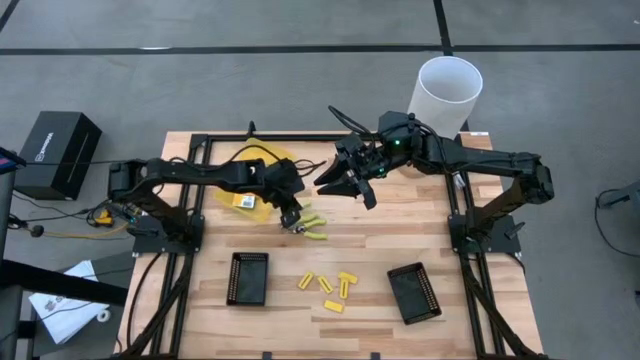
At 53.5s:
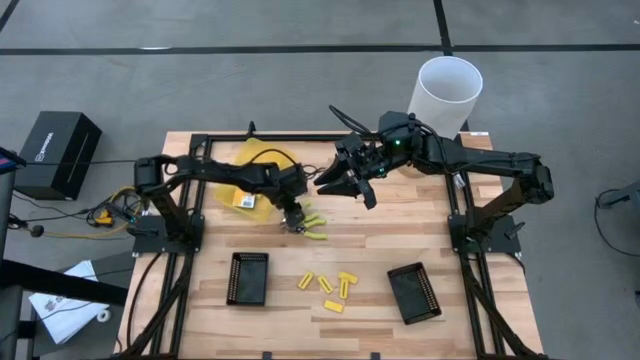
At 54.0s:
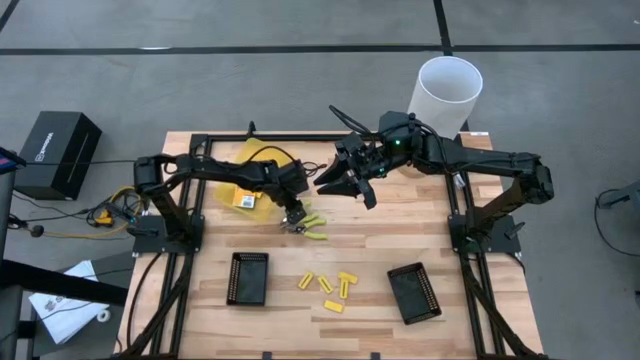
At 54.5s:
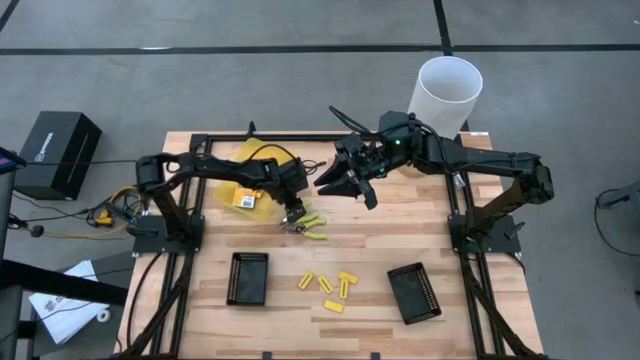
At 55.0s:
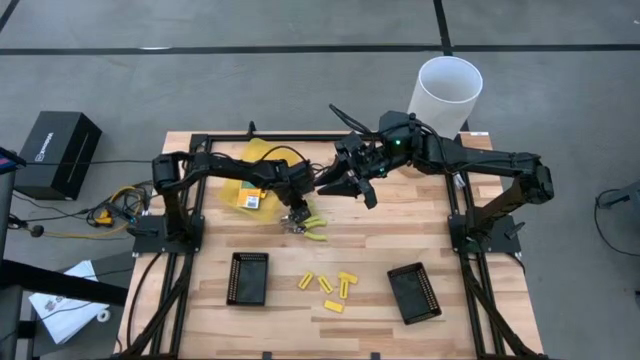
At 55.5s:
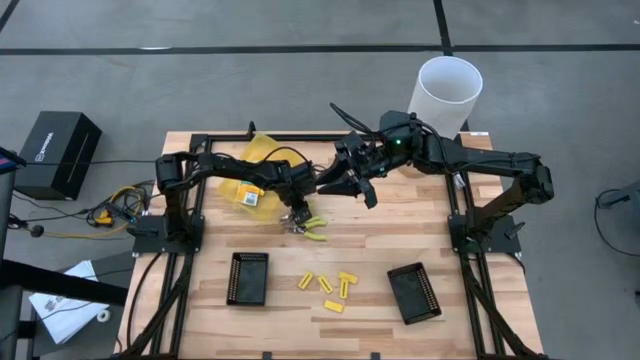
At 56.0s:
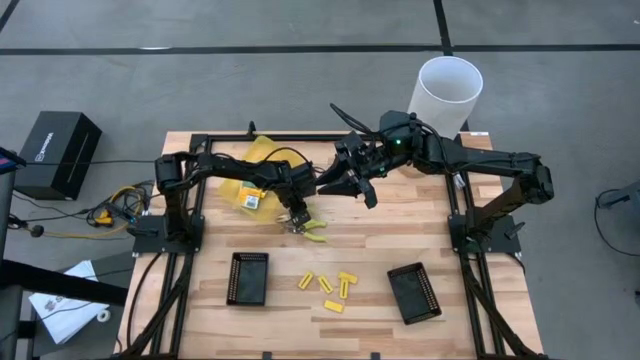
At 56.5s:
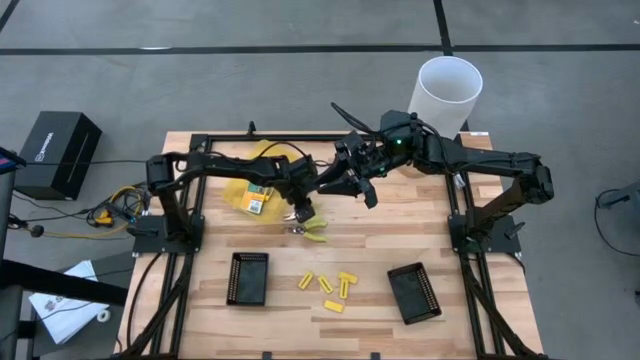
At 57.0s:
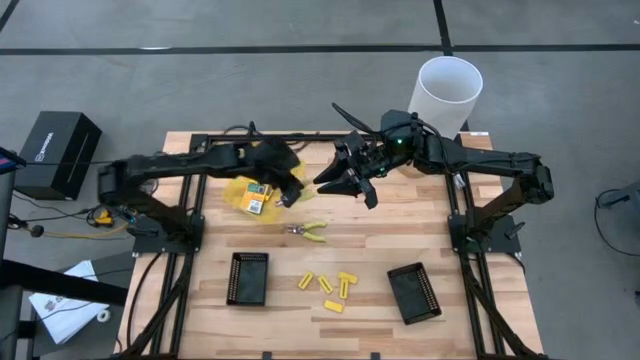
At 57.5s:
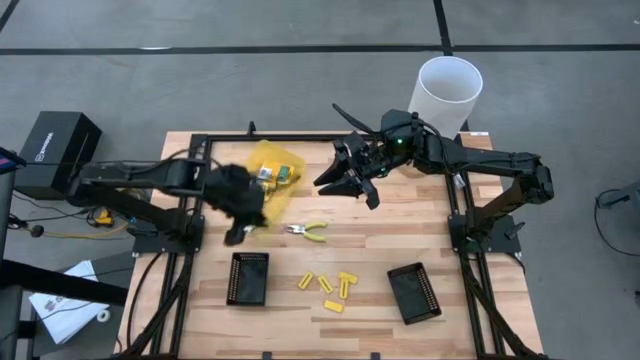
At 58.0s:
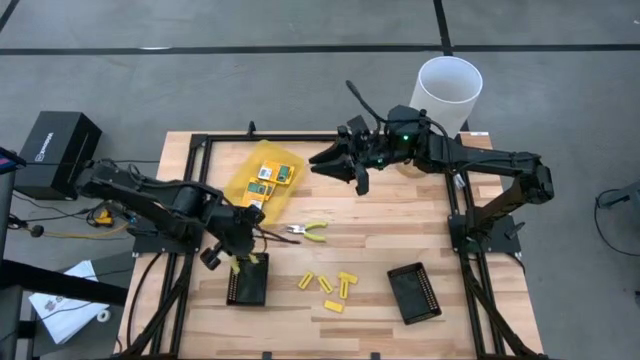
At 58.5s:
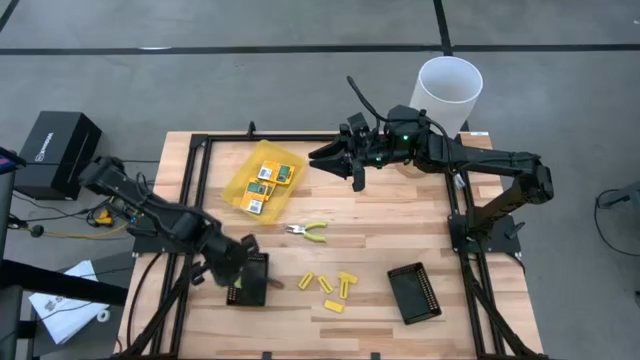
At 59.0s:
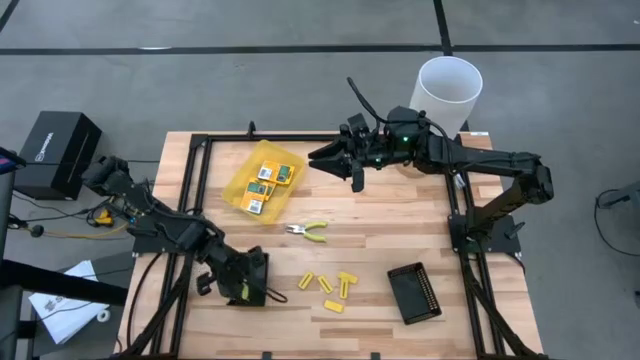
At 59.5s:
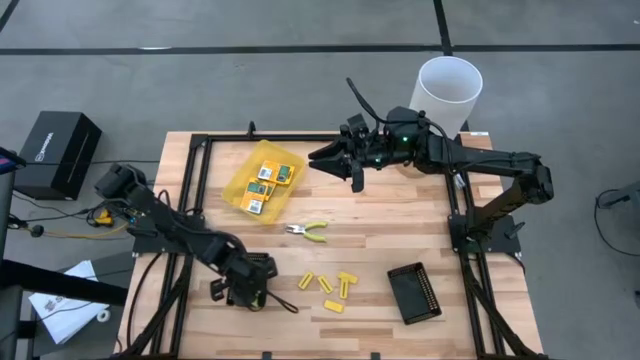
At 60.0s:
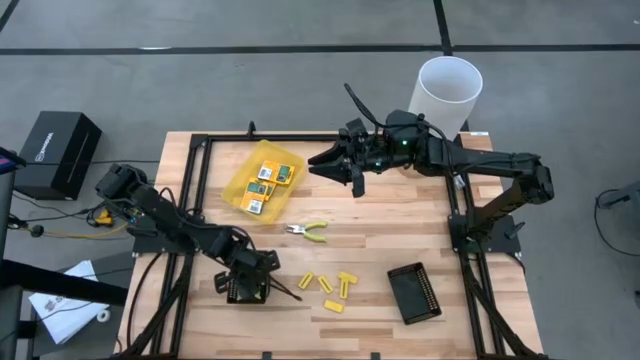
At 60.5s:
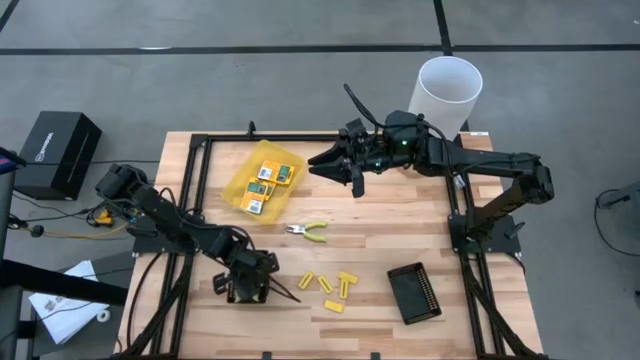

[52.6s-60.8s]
Task: Pick & Place School Supplies
Put the green hole puncher into the left black bin

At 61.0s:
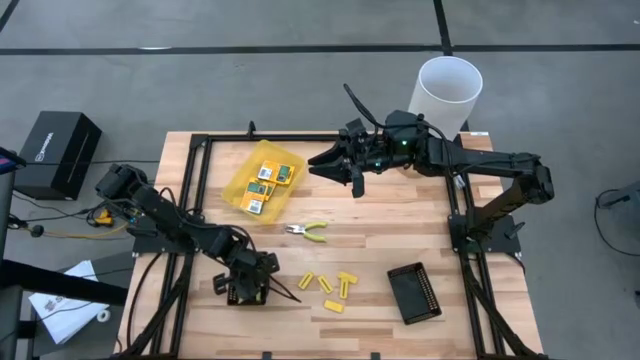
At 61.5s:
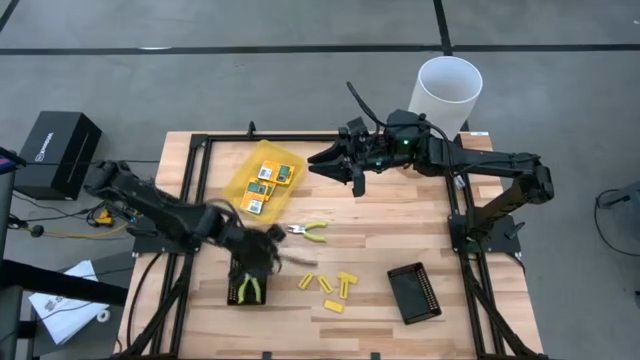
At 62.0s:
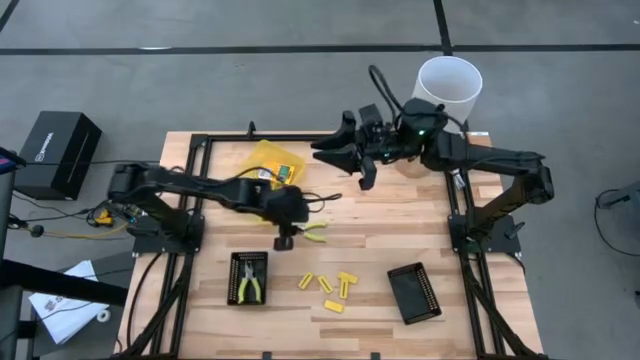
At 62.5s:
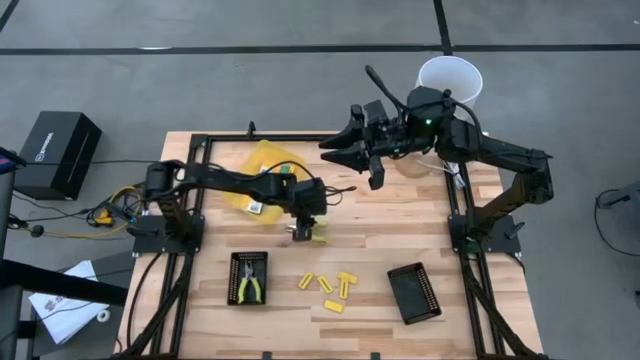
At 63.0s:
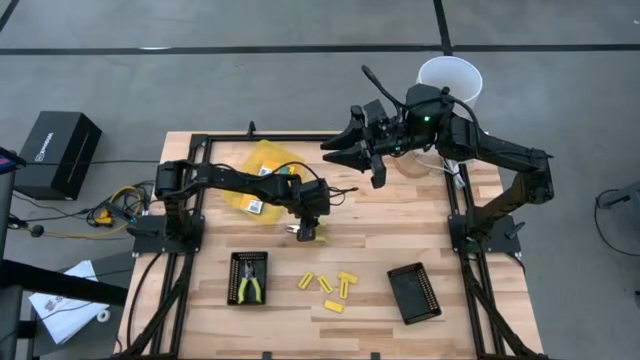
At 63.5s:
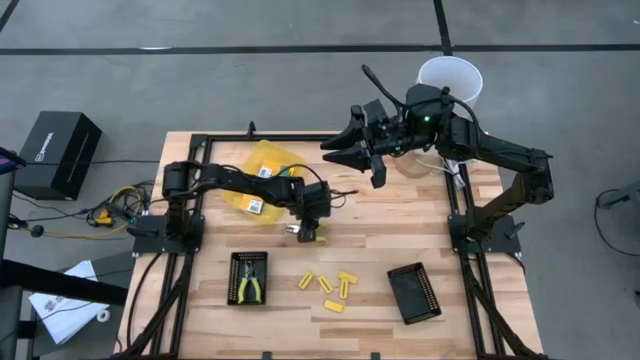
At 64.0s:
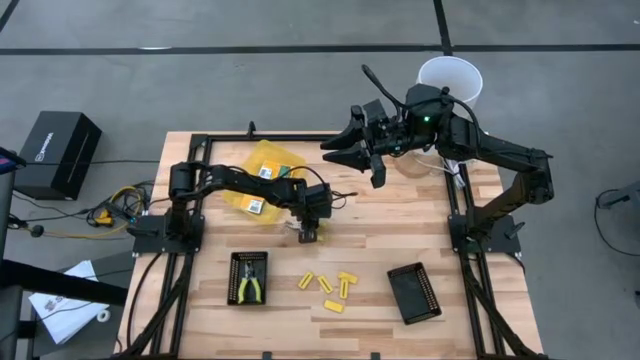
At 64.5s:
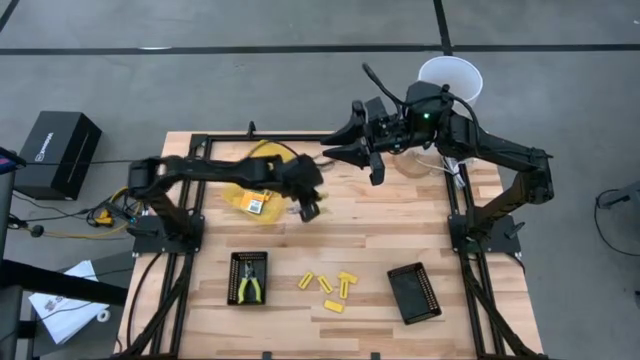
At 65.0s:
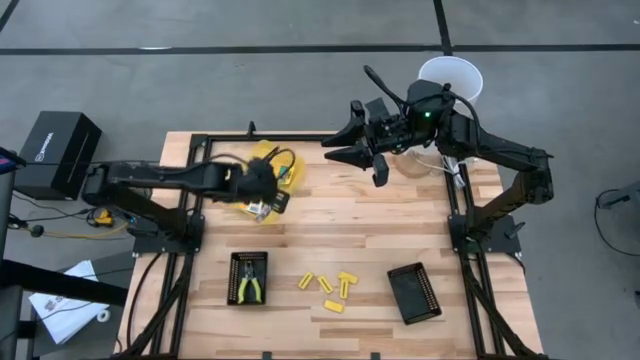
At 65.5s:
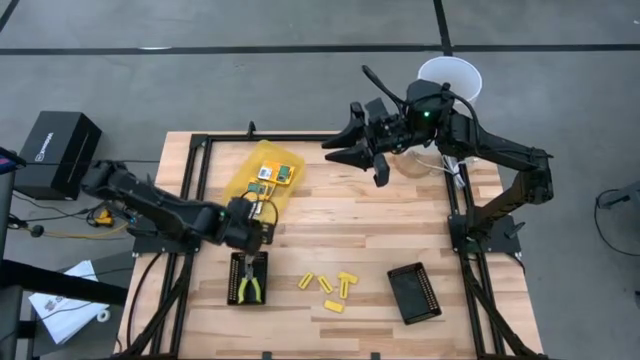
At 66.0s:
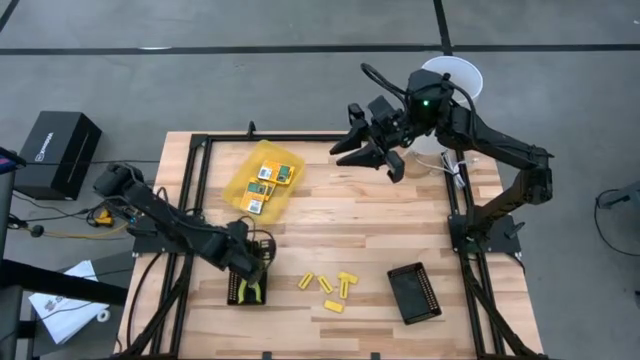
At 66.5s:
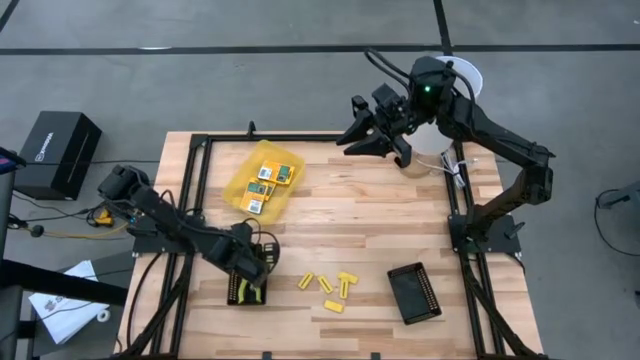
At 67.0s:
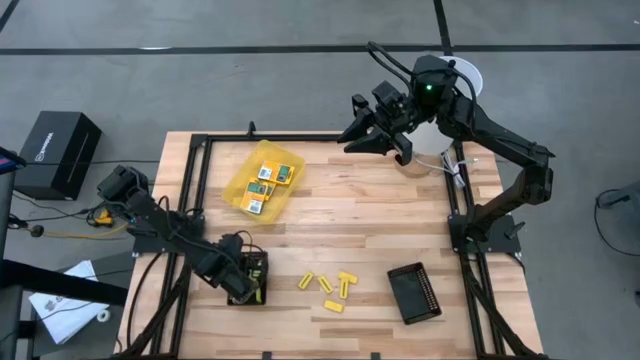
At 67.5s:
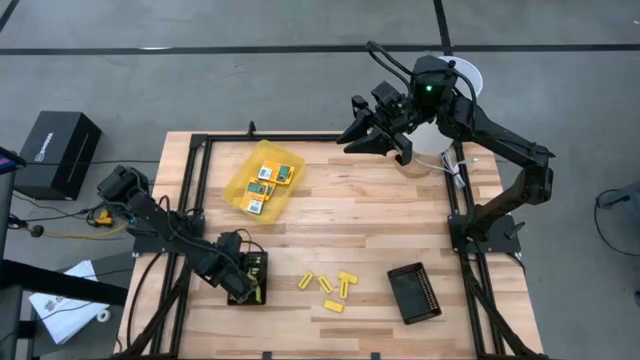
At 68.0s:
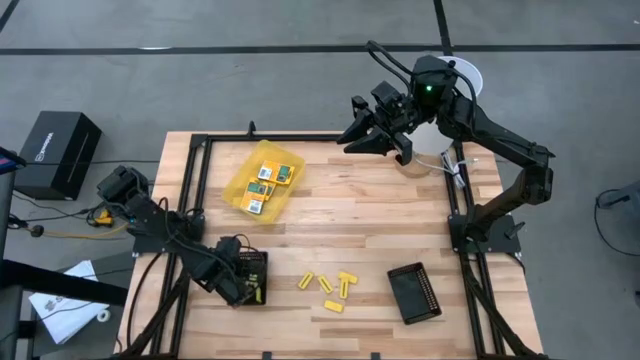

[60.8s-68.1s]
Put the green hole puncher into the left black bin

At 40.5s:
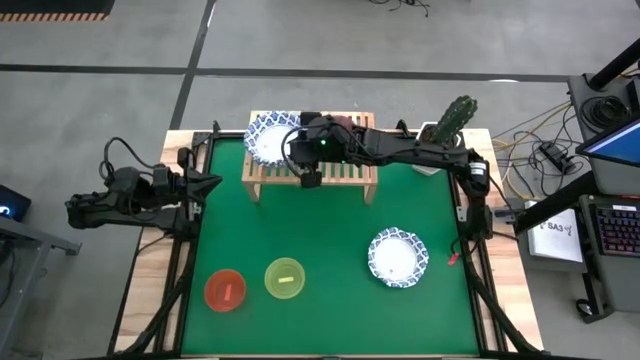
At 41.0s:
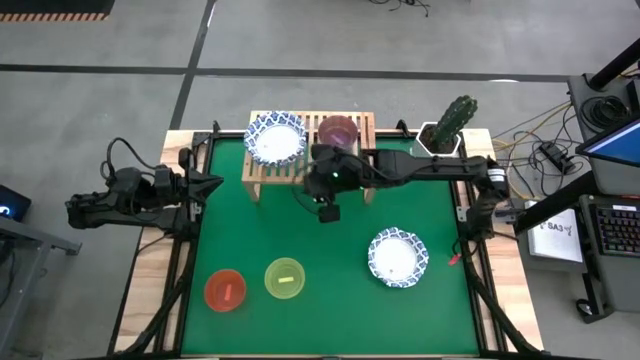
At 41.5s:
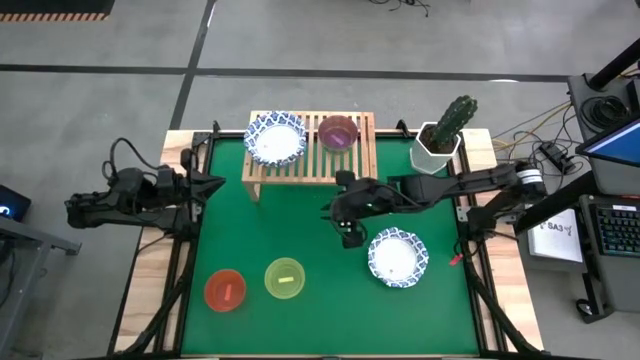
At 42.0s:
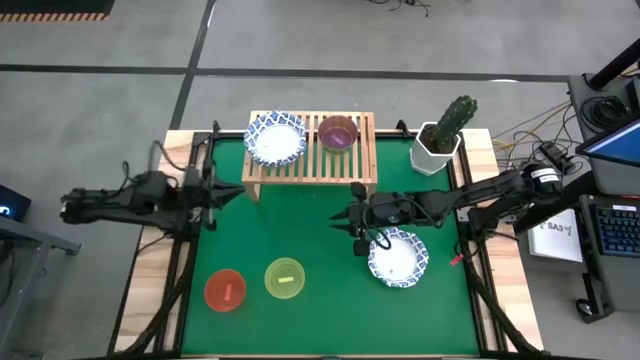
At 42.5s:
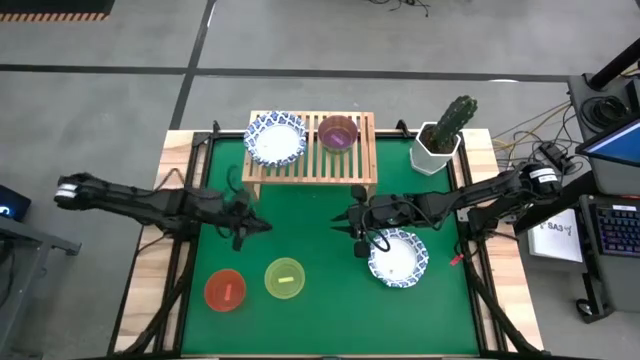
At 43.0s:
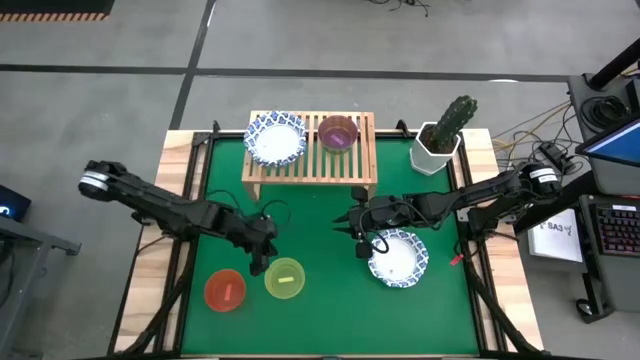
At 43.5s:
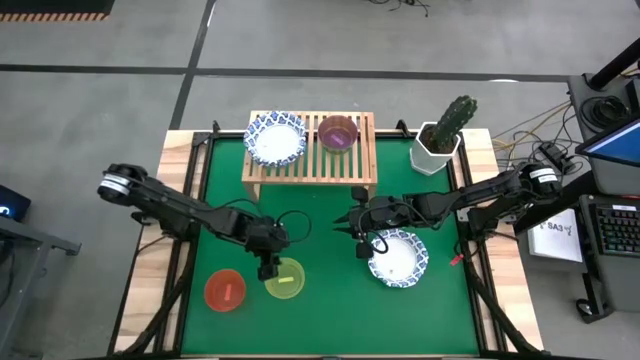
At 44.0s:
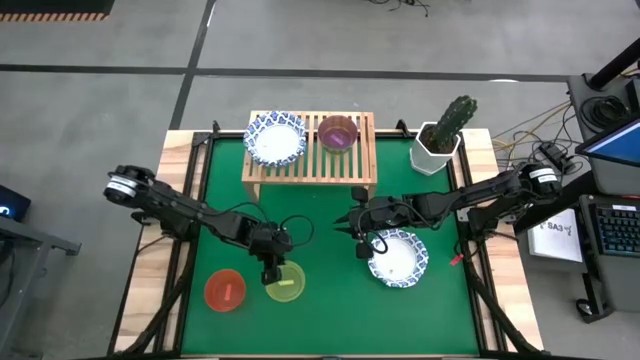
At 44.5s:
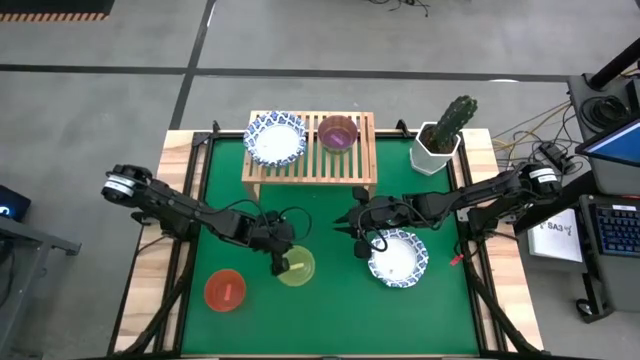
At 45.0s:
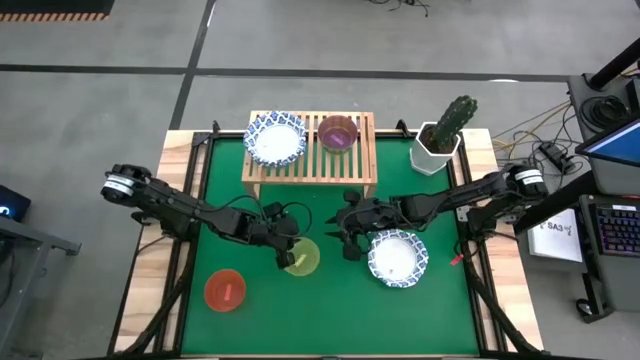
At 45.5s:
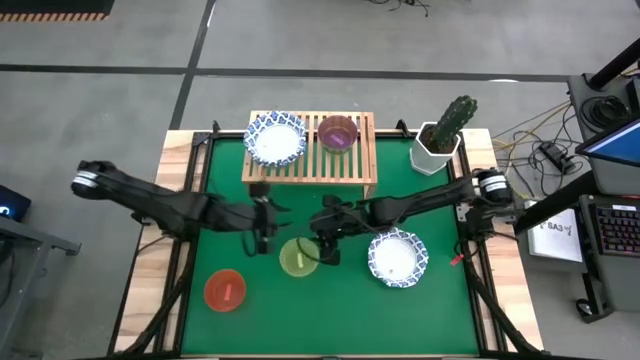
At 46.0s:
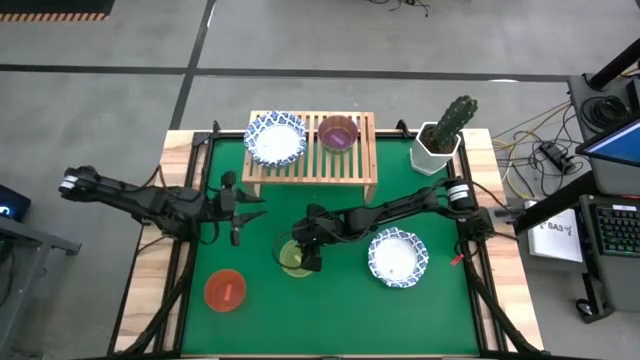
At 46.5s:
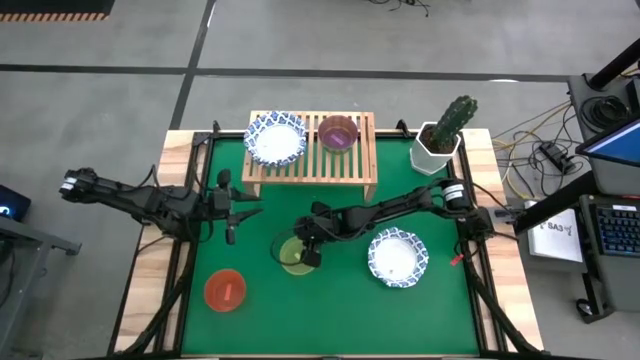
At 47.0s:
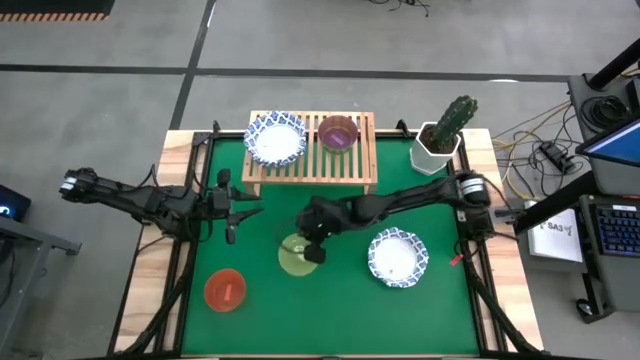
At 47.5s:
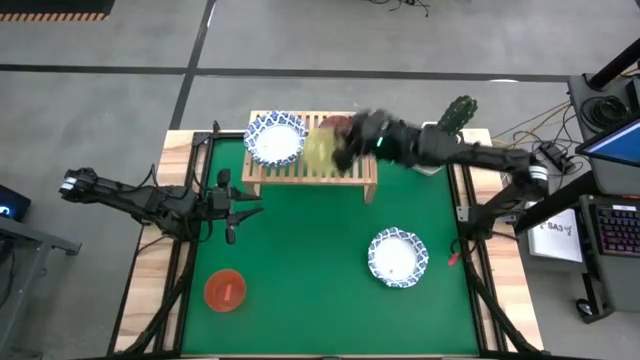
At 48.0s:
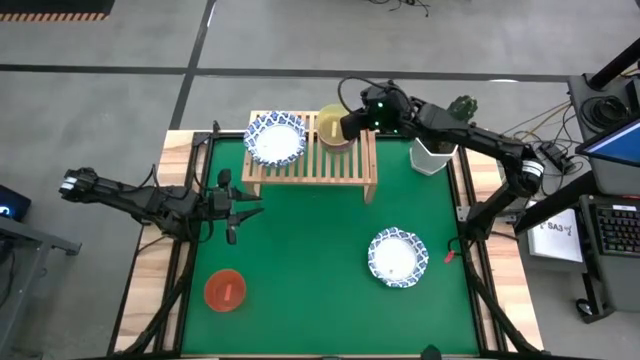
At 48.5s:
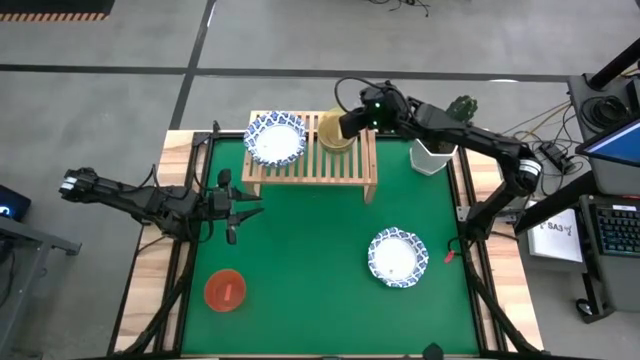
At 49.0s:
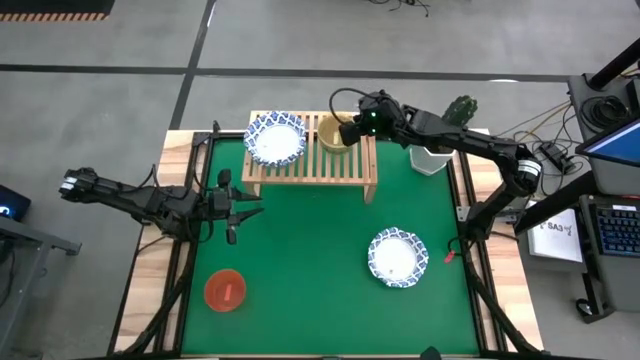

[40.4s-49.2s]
Task: Place and stack bowls onto a shelf
Stack the yellow bowl on top of the purple bowl on the shelf
